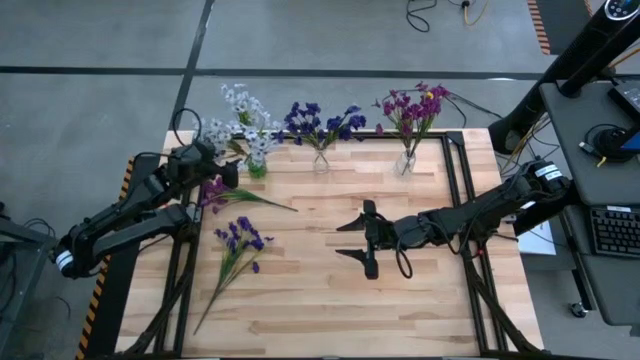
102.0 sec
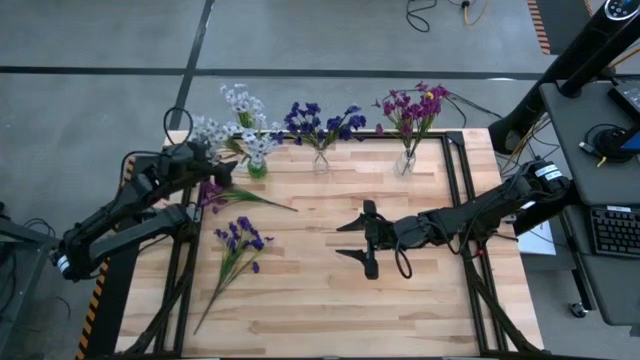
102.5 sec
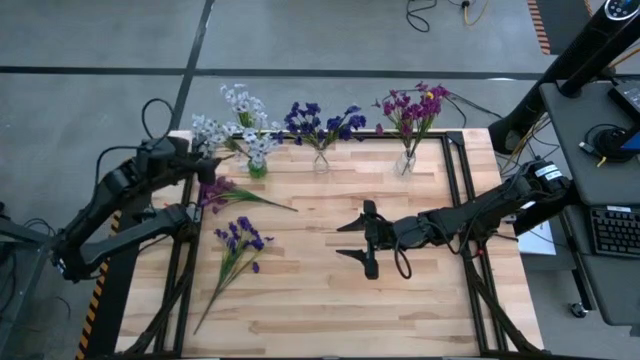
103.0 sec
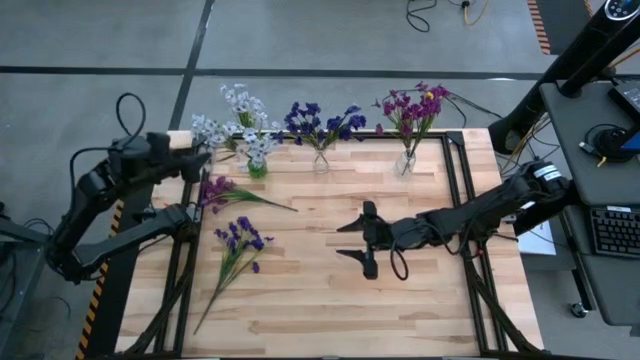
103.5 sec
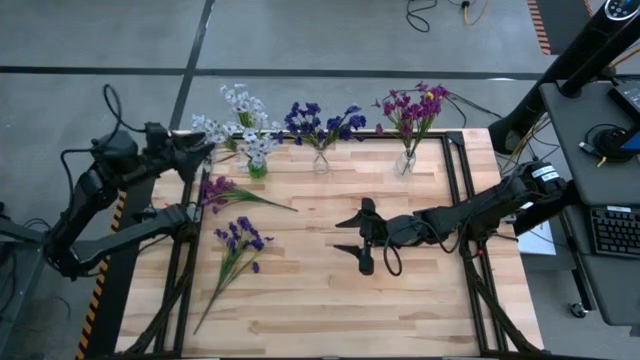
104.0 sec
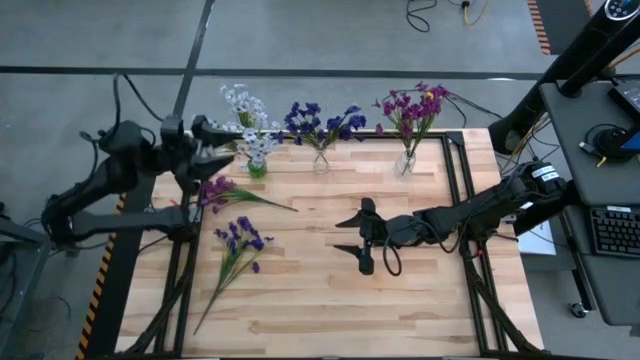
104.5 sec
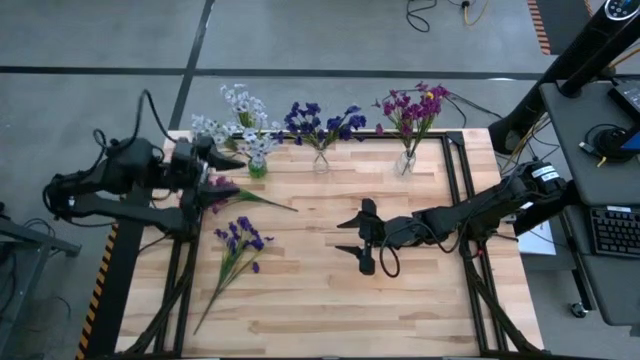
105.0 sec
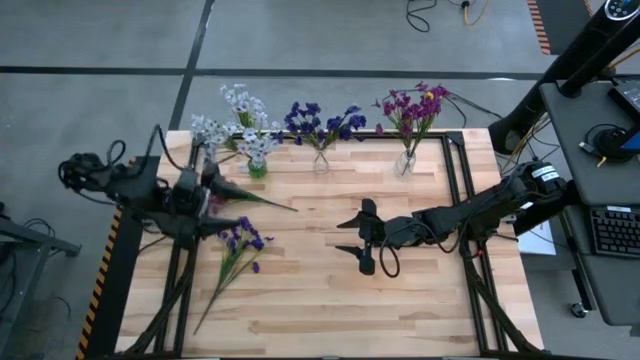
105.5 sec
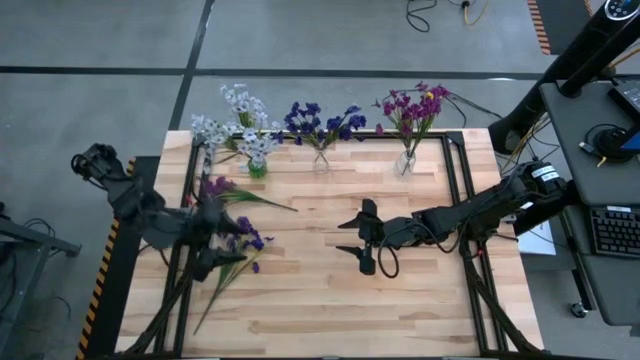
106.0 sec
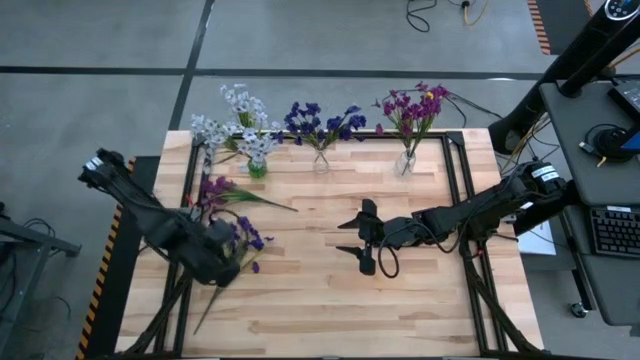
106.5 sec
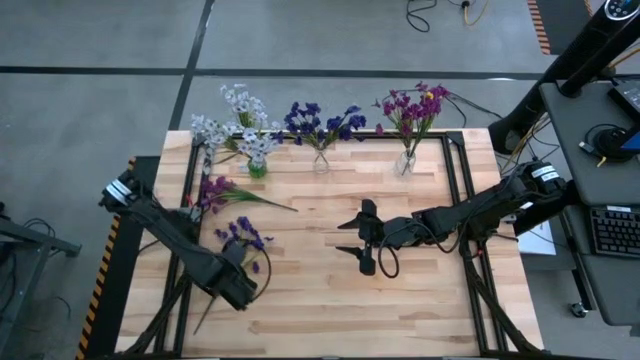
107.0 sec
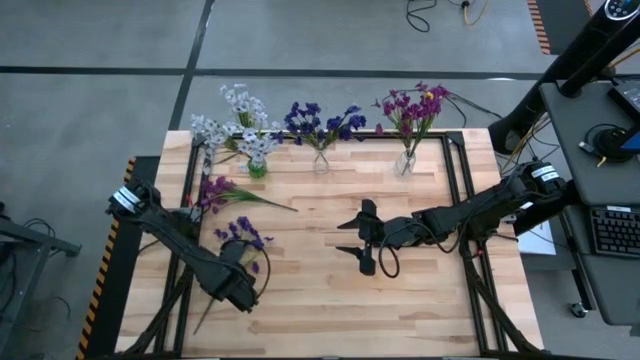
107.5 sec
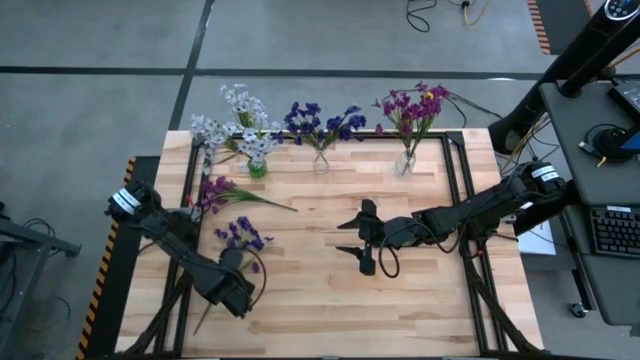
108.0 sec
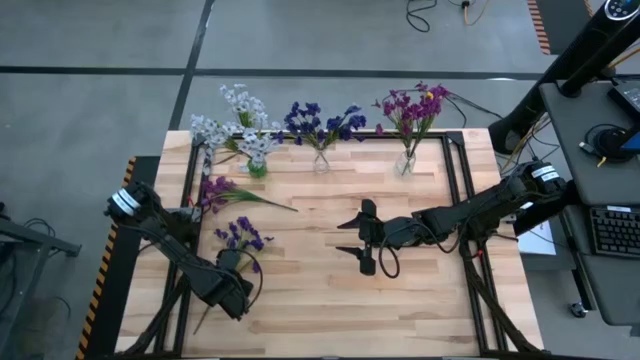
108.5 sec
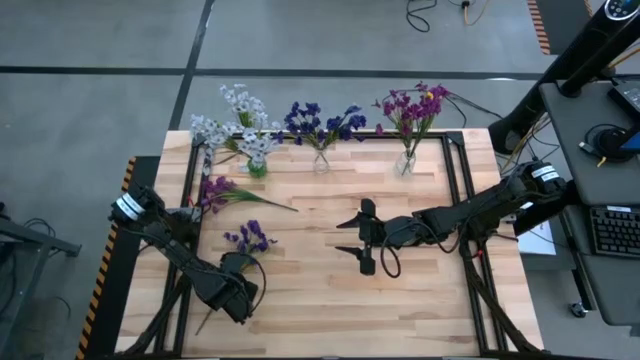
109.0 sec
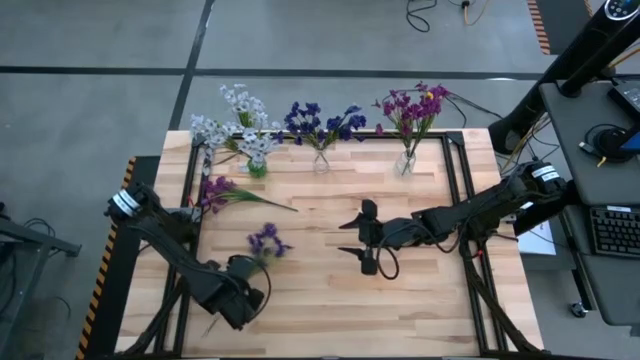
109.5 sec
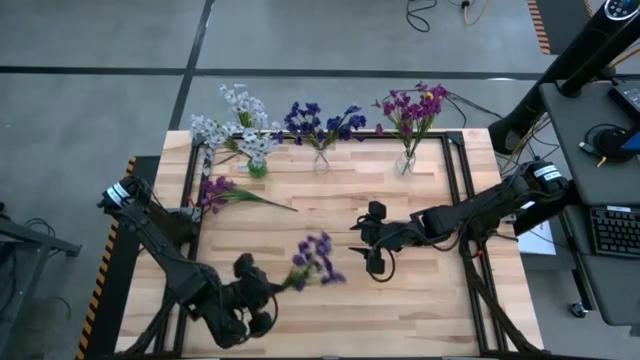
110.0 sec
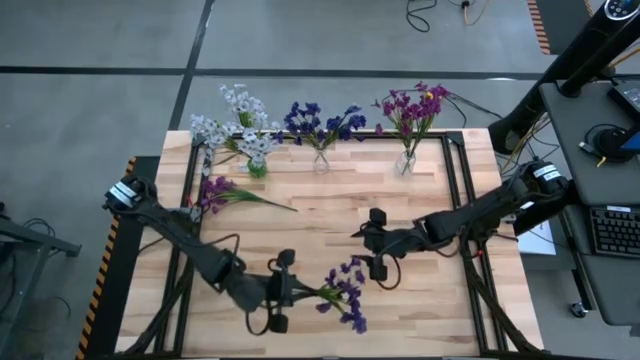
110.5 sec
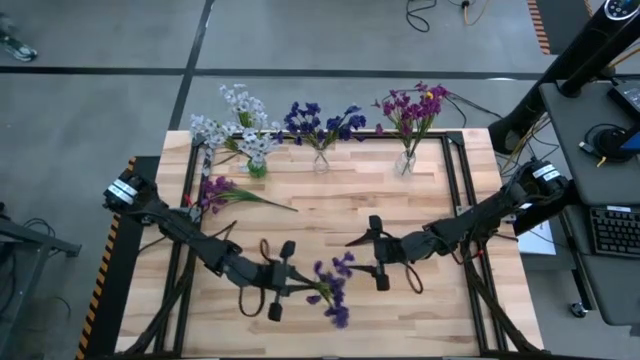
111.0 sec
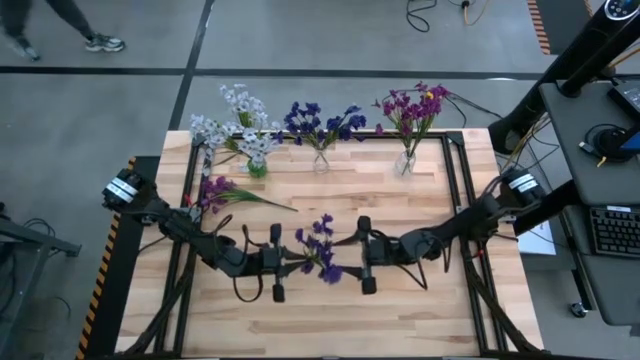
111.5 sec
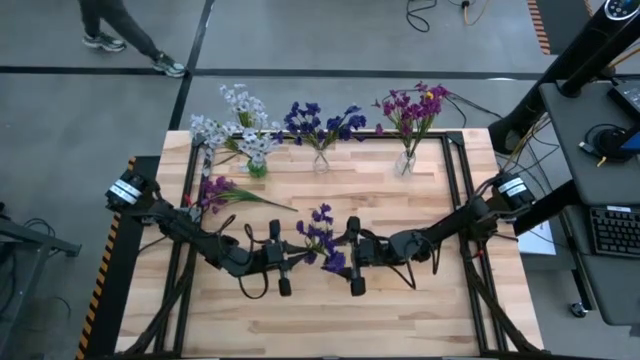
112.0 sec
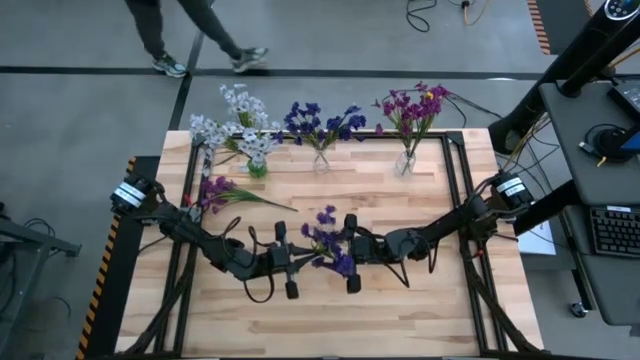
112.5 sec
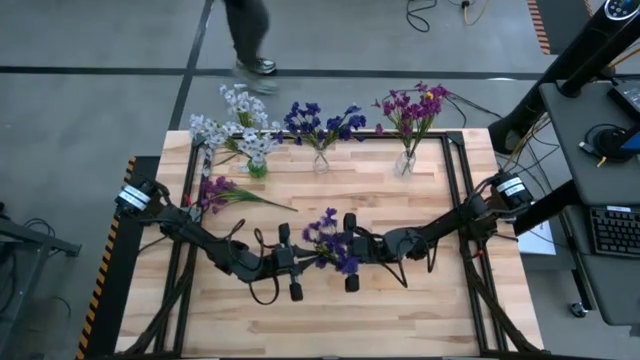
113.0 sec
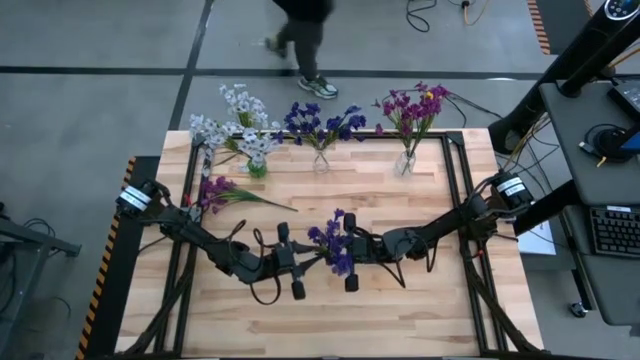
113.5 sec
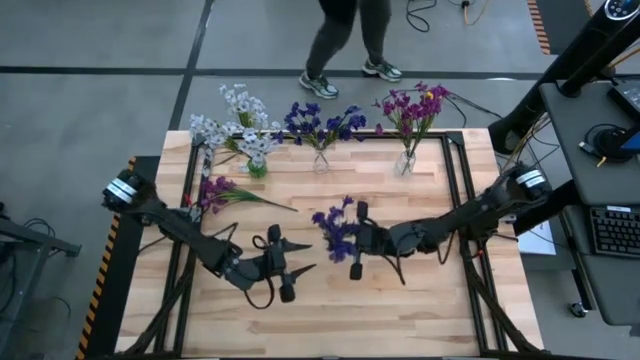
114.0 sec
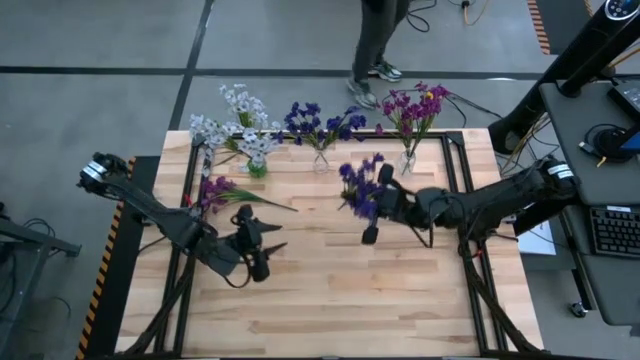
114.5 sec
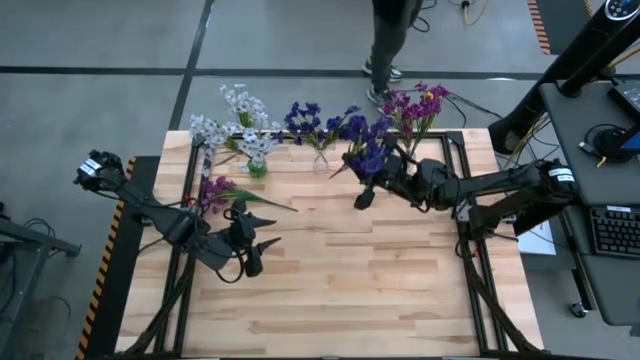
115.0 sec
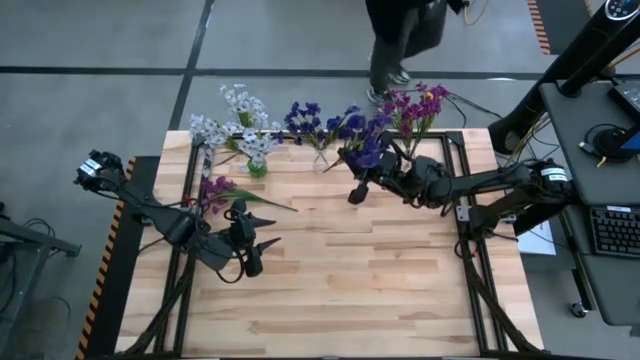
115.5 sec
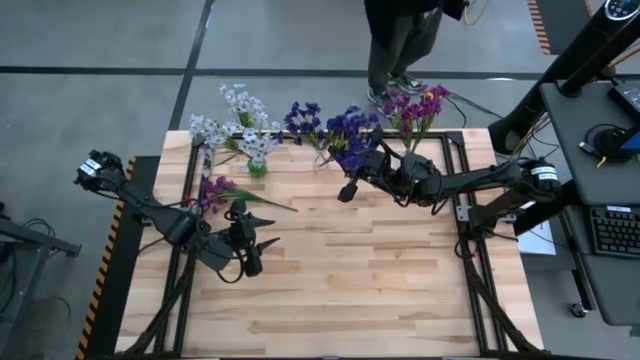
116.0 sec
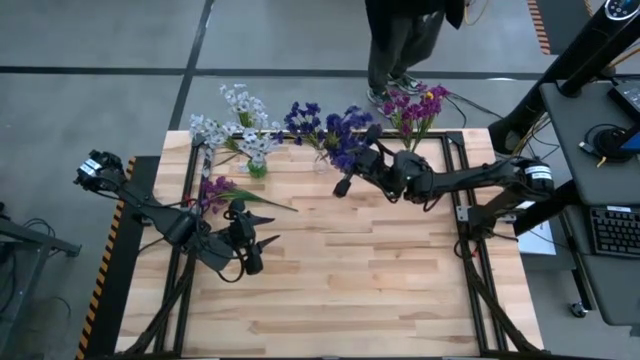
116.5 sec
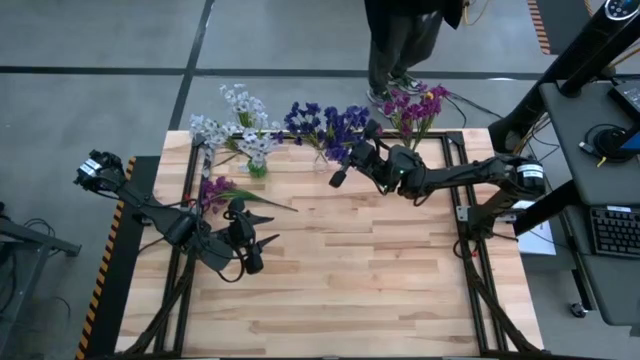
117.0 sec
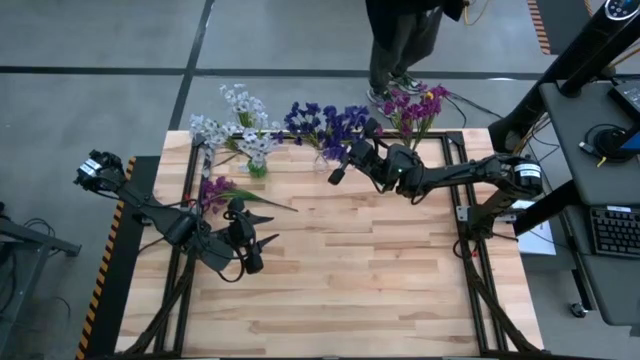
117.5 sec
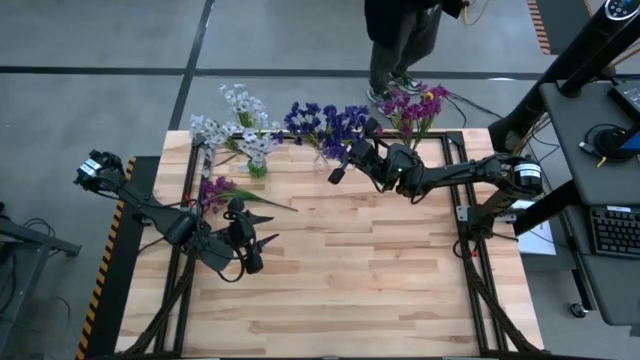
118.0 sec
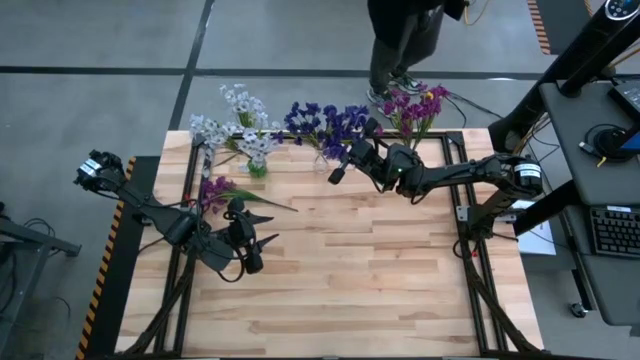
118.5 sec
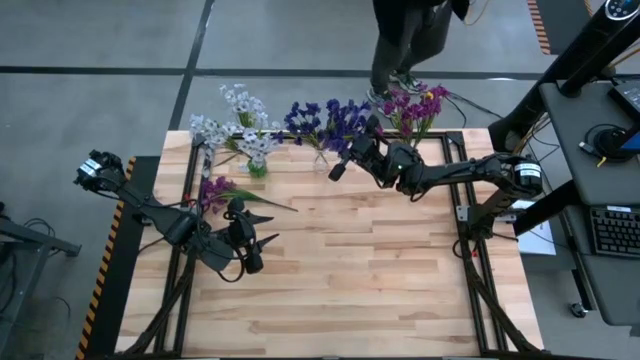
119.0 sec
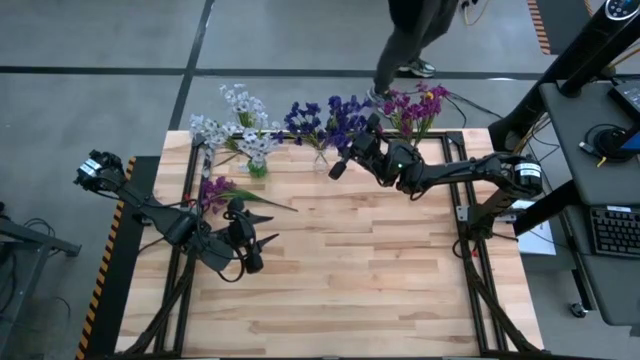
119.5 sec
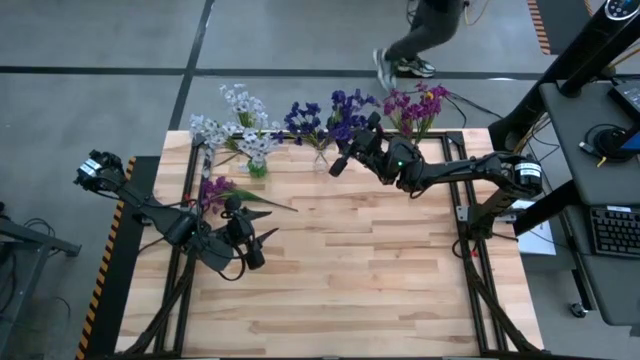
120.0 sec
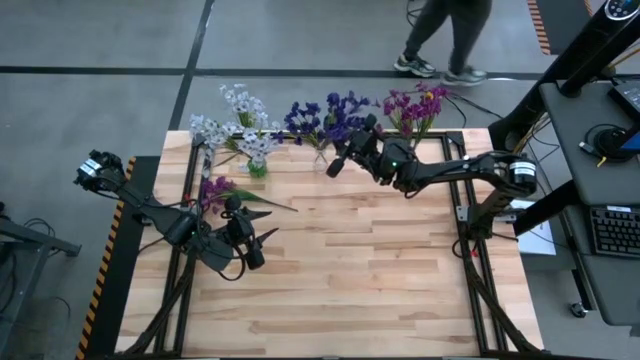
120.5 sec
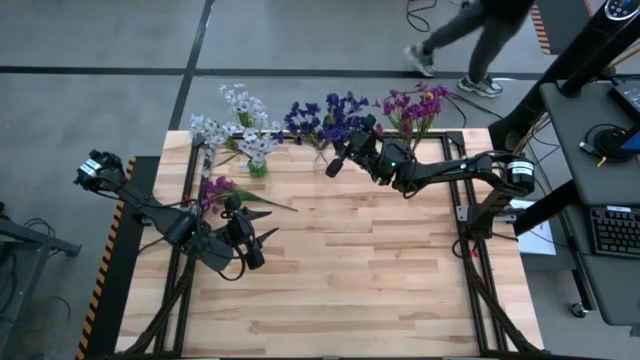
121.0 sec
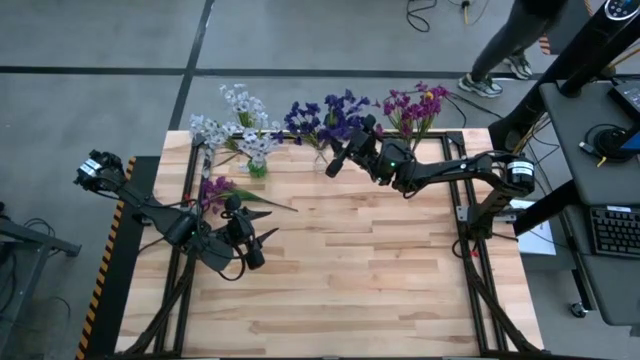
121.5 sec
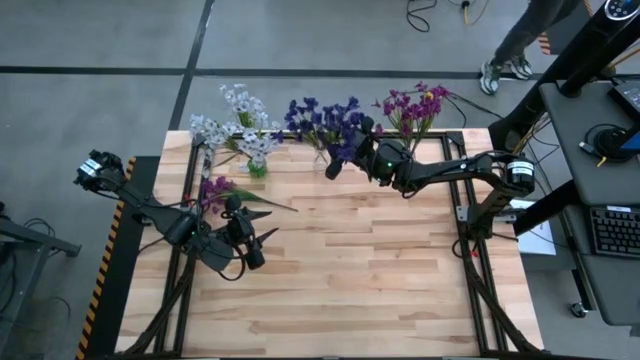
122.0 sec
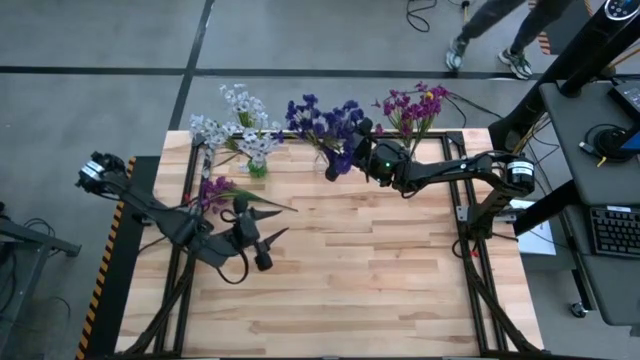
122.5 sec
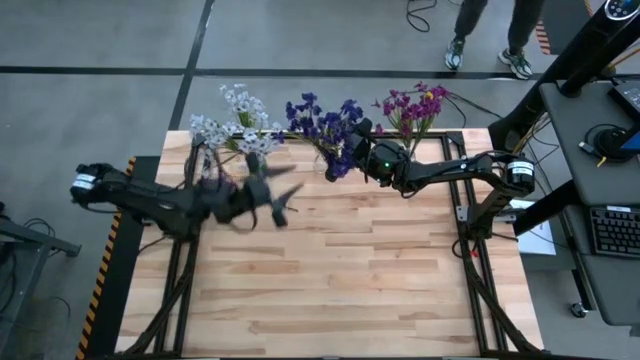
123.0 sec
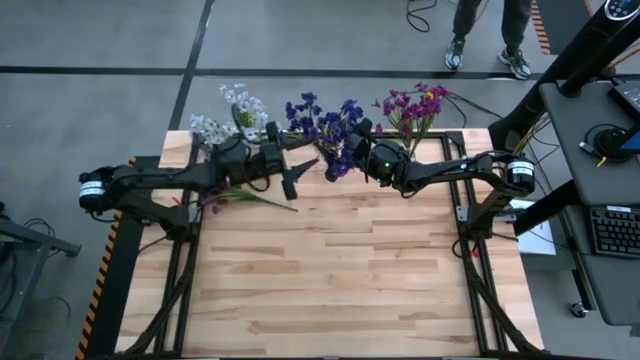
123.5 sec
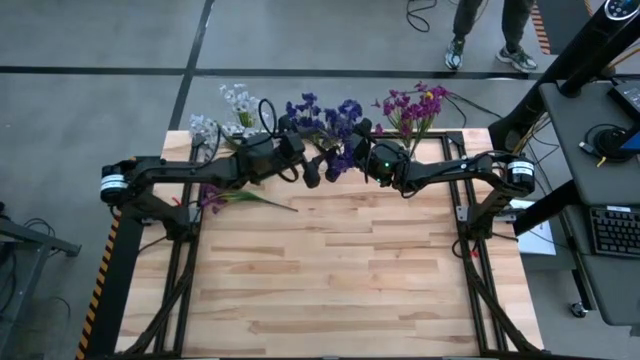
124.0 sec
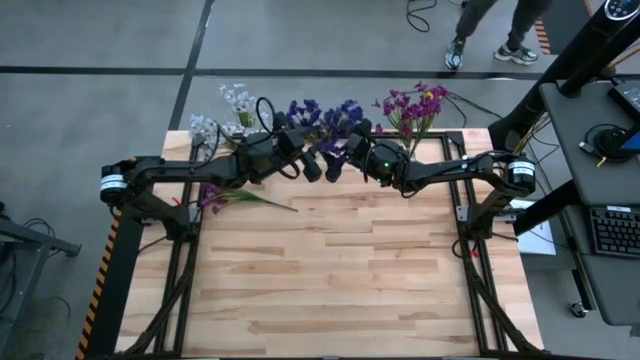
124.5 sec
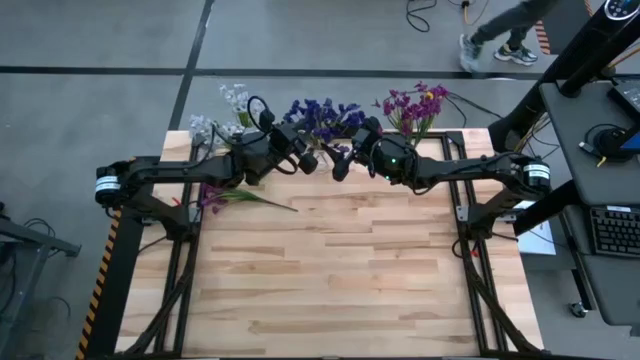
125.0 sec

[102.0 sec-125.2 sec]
Task: Sort flowers into vase by color
Put the dark violet flowers into the left transparent vase
